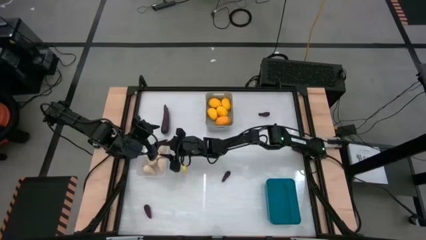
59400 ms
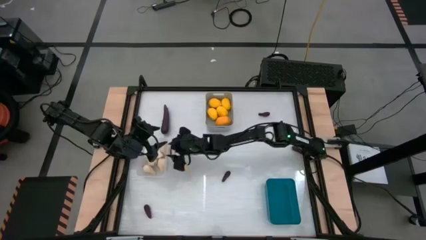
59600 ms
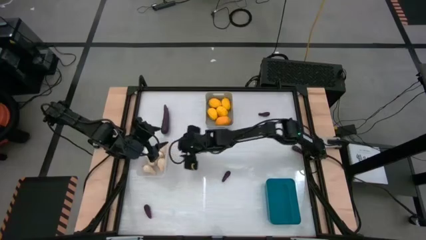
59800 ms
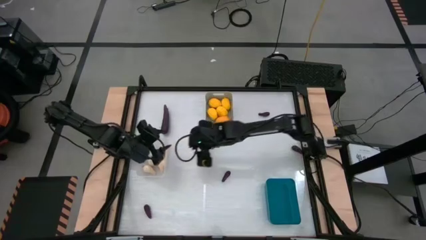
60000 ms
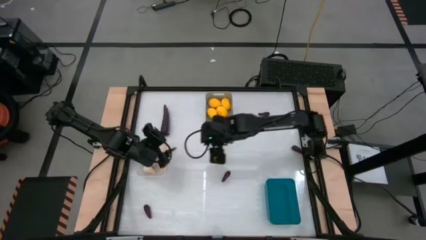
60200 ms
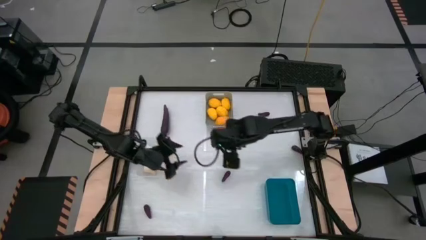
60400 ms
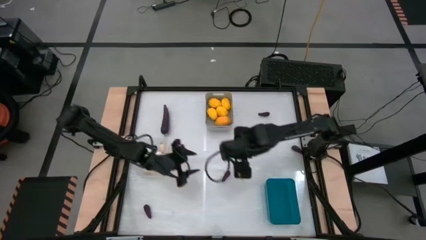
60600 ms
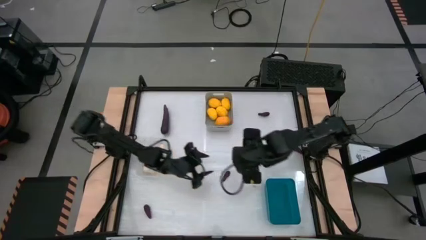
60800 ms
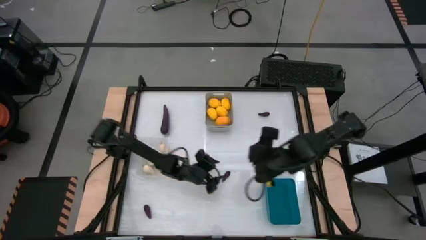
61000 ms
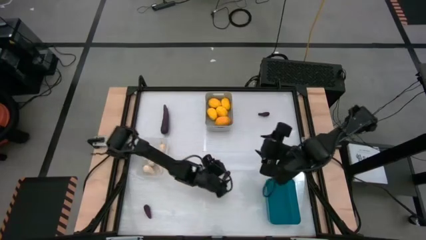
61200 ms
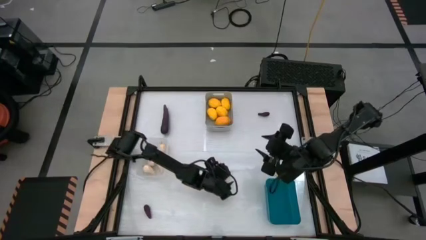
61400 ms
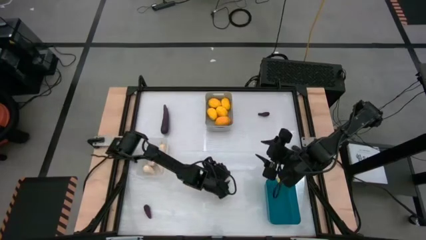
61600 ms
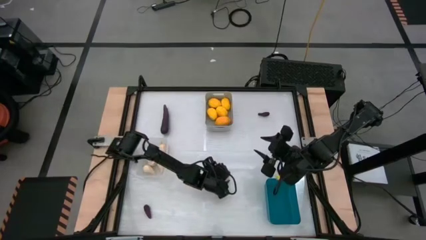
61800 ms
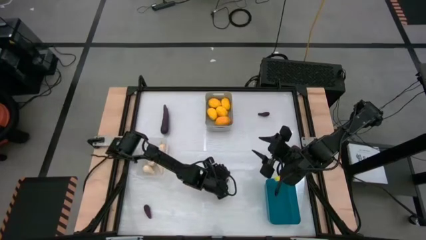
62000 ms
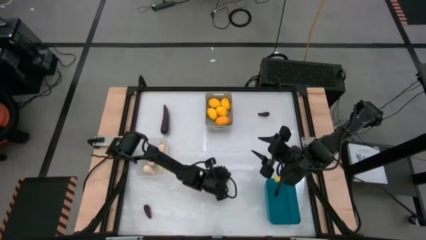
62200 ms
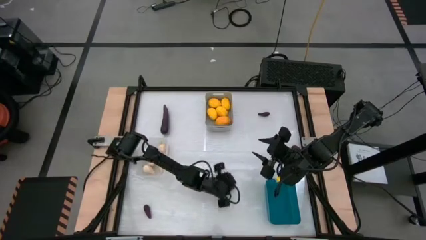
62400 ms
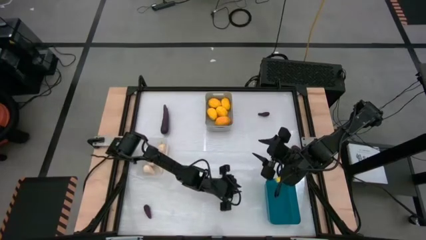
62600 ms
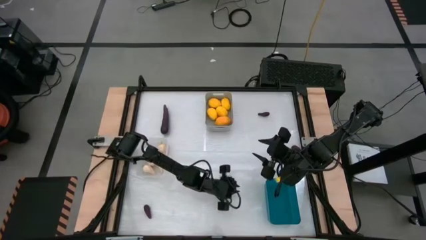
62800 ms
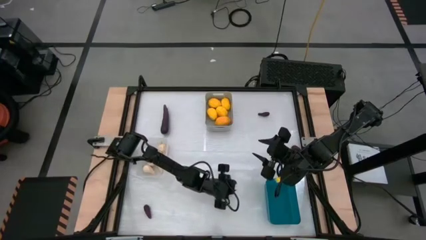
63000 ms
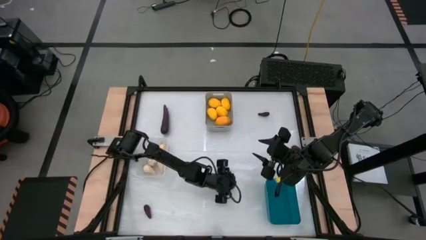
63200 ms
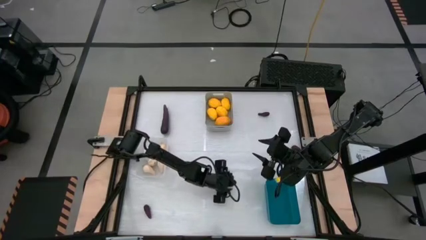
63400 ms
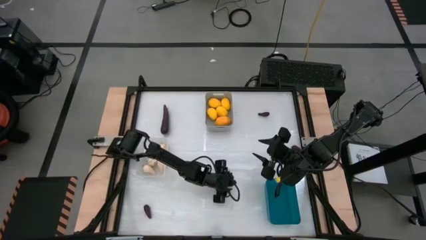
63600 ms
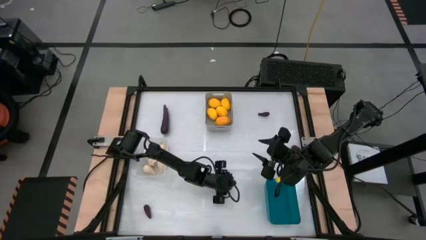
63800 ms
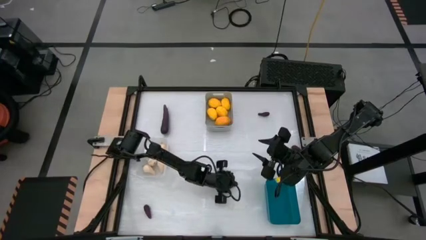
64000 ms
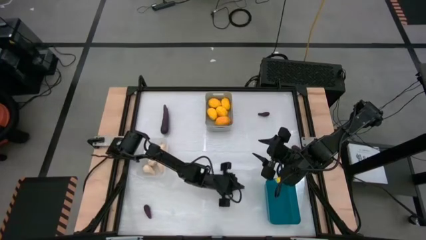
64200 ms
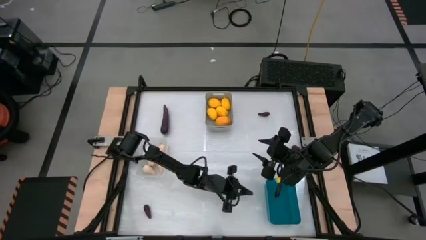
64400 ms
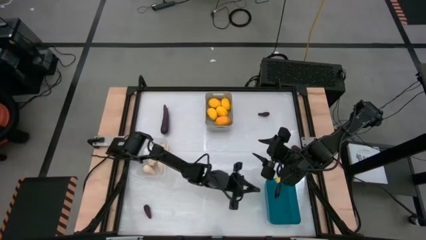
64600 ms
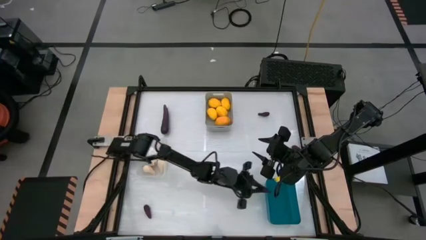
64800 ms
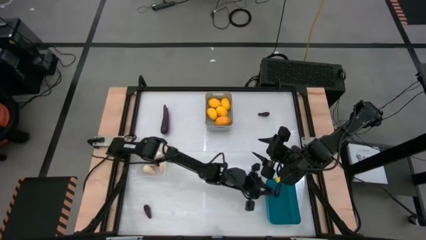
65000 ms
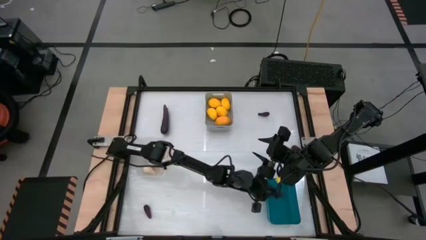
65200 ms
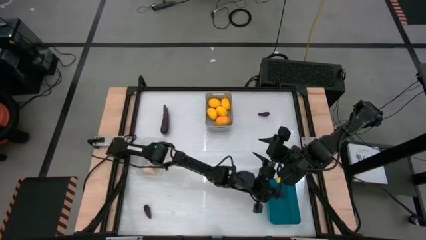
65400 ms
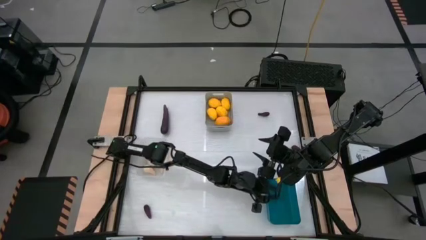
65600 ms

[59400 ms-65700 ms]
Task: Sort produce into baskets
Put the eggplant into the blue bin

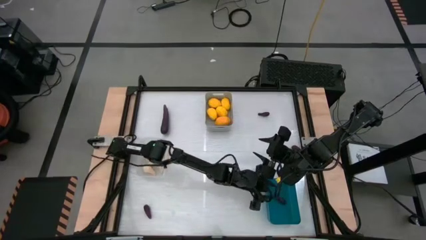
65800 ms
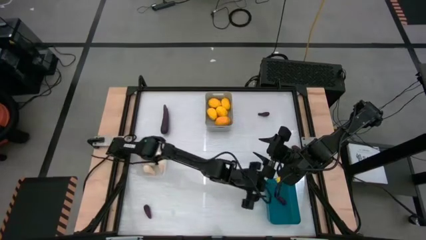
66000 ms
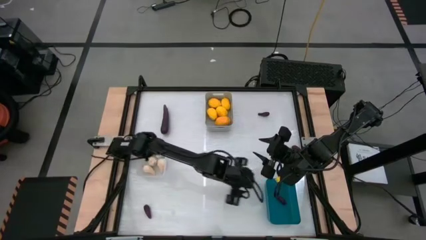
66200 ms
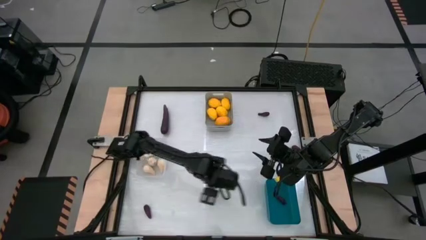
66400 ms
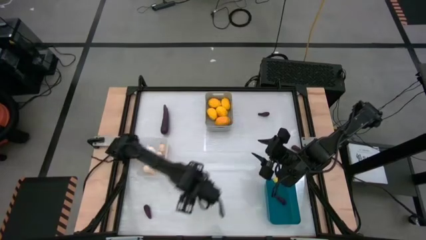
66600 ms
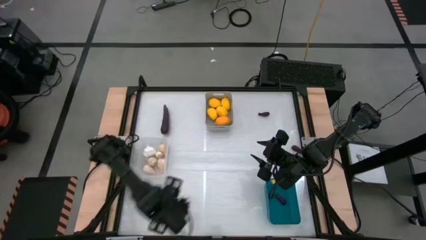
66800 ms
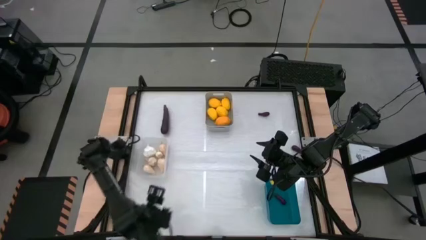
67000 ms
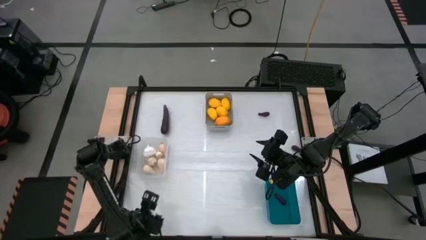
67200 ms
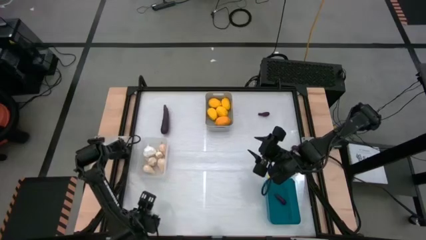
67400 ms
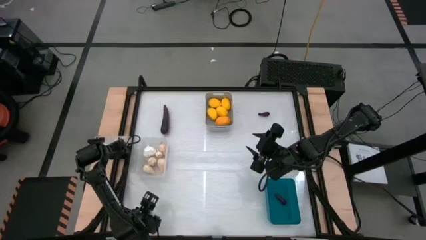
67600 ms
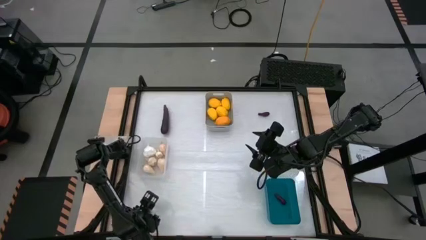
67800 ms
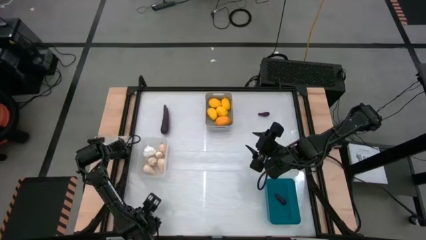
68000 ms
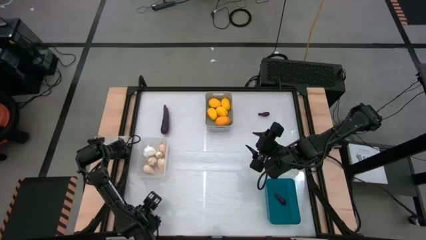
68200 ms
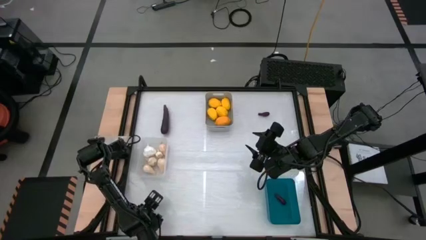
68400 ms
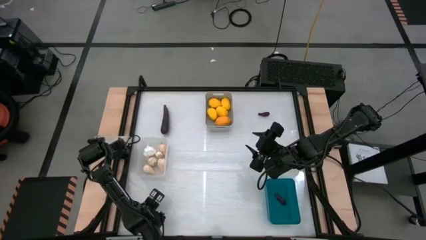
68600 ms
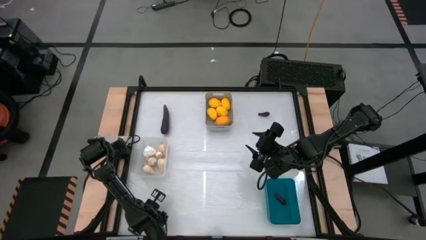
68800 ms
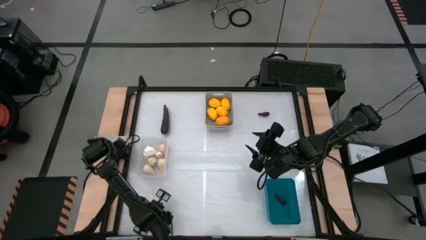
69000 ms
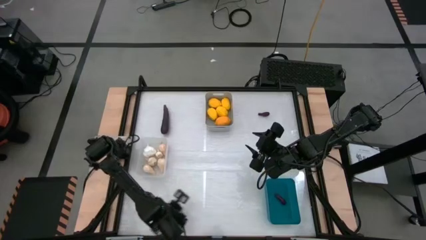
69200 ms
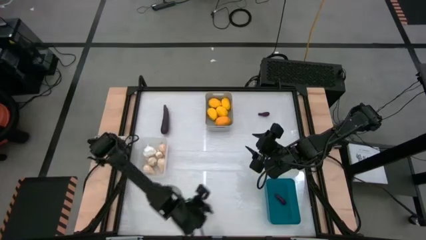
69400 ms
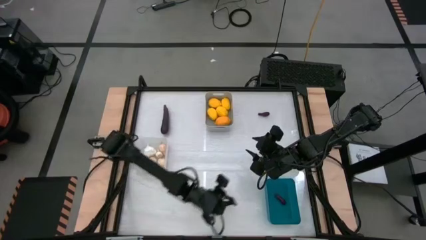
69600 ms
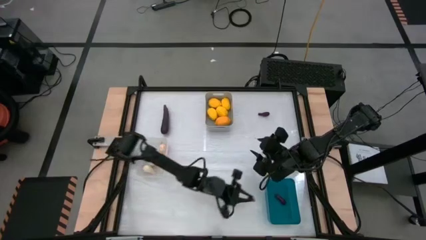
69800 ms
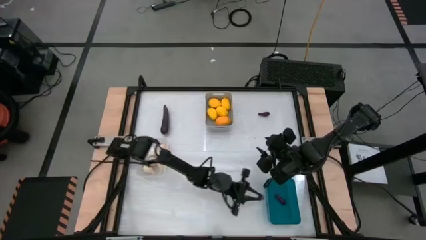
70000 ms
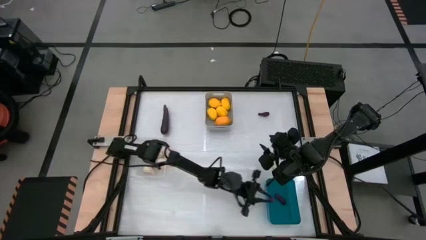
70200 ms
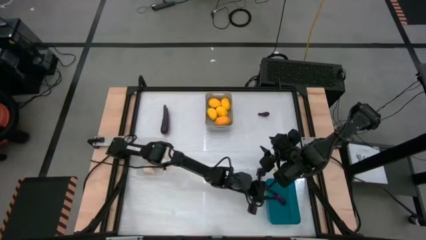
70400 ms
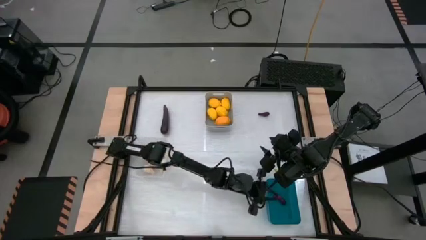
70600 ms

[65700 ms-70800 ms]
Put the eggplant into the blue bin

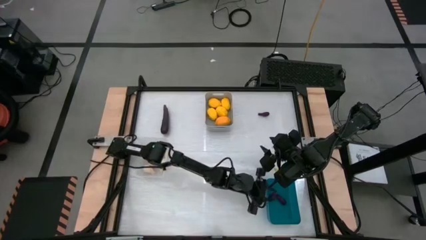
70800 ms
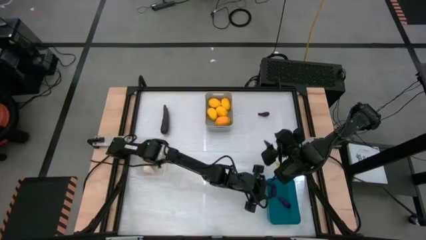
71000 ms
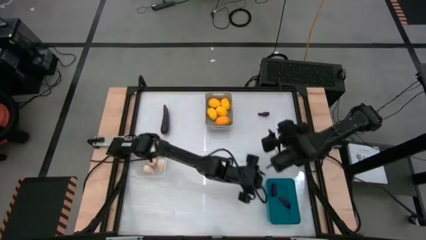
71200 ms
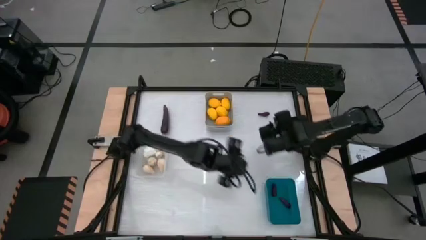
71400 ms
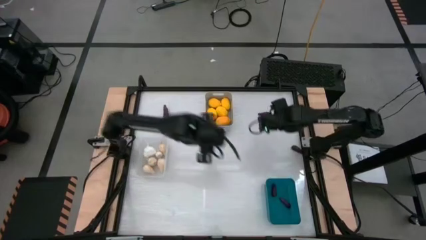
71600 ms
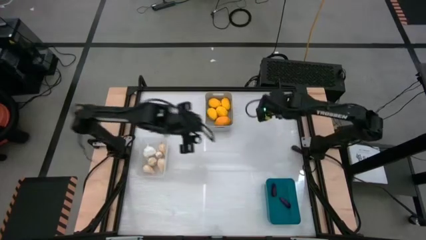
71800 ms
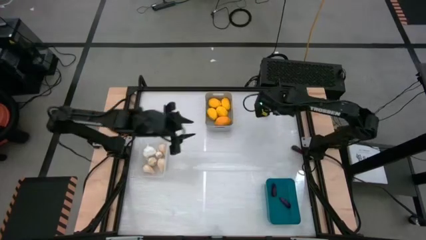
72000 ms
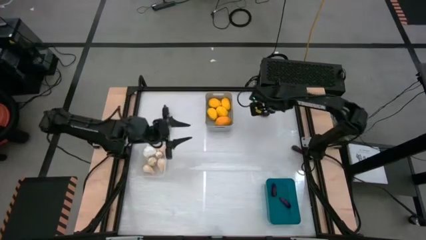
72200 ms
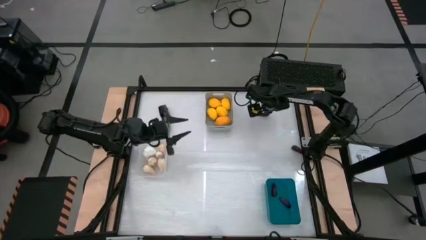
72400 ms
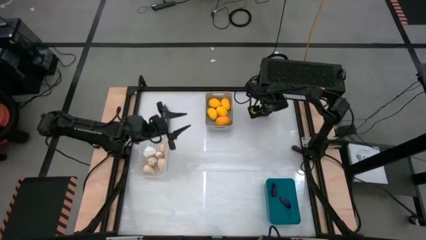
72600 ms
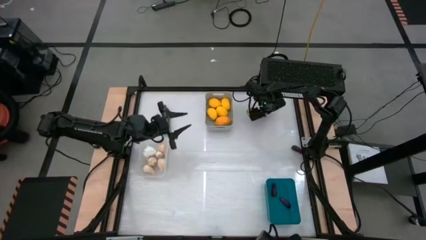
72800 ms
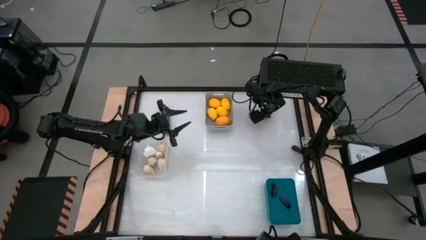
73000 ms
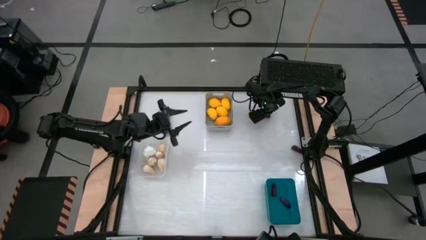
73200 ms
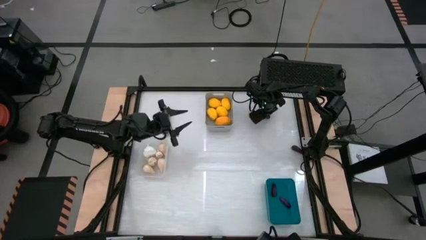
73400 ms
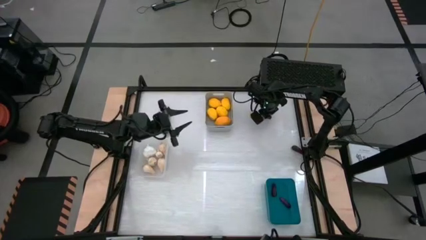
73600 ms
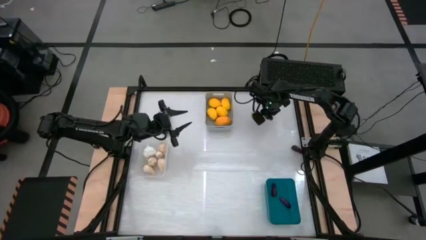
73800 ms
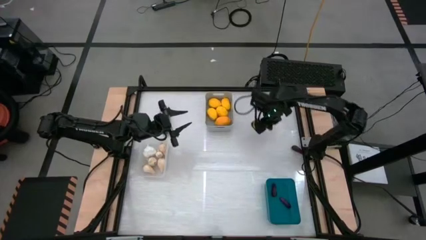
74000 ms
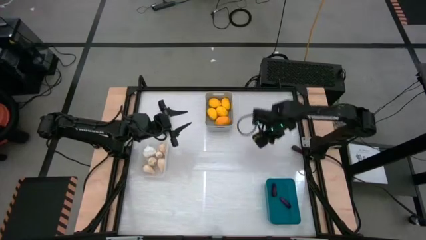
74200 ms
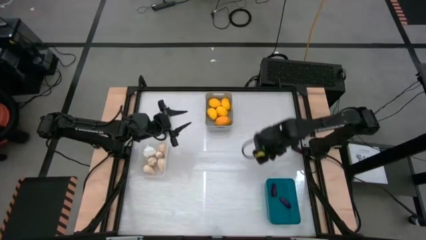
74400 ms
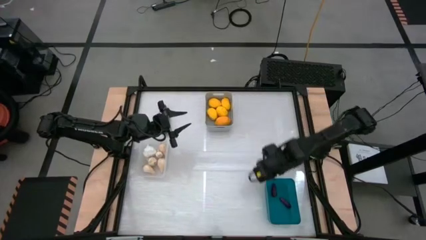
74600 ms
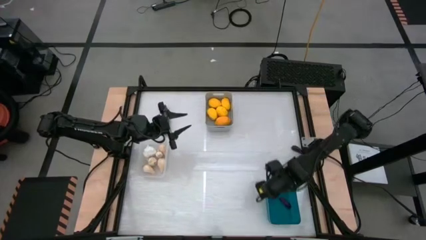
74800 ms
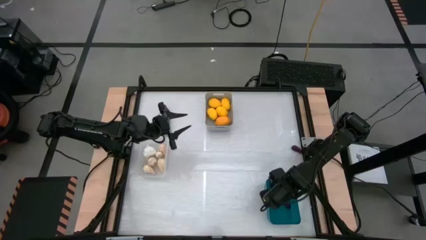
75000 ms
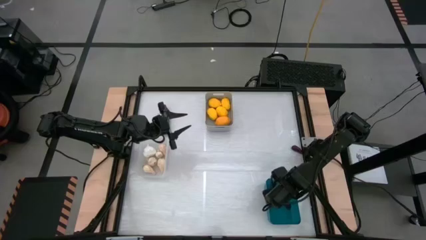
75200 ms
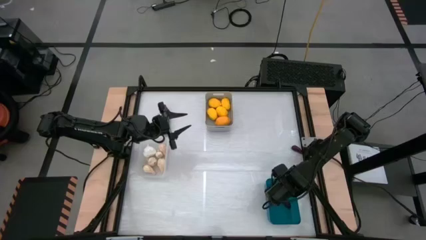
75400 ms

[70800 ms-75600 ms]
Put the eggplant into the blue bin
